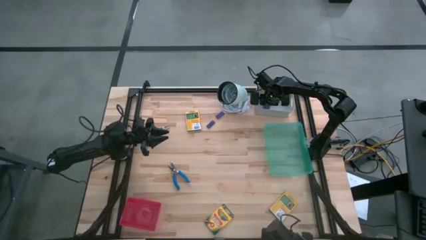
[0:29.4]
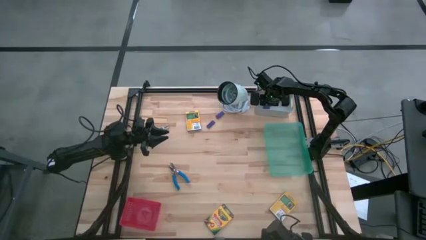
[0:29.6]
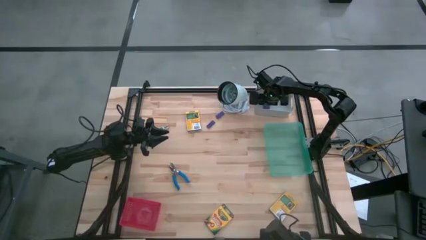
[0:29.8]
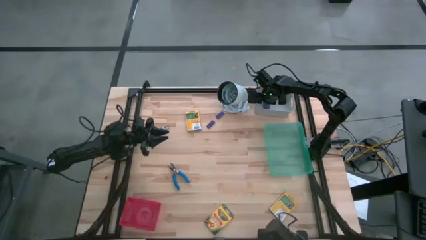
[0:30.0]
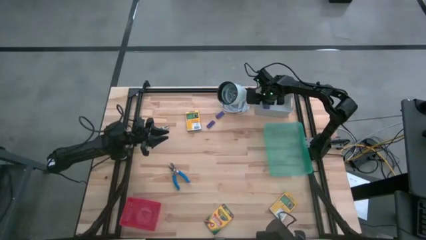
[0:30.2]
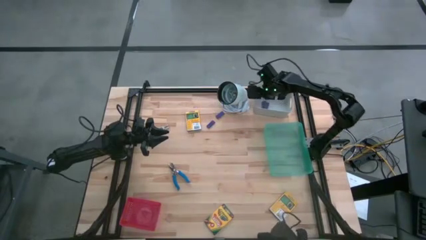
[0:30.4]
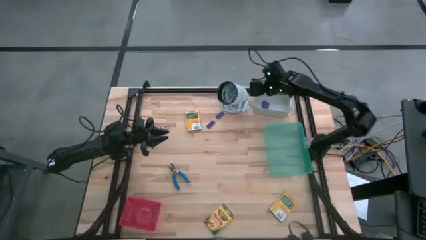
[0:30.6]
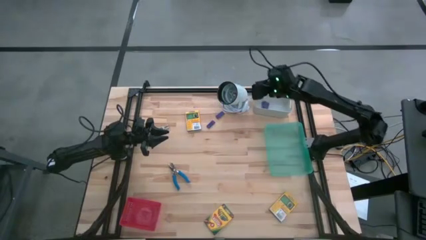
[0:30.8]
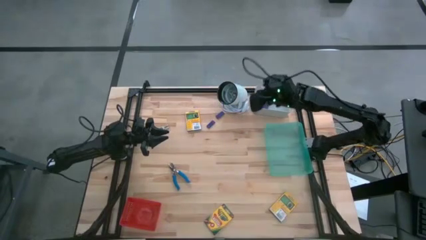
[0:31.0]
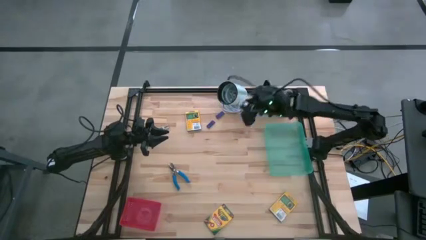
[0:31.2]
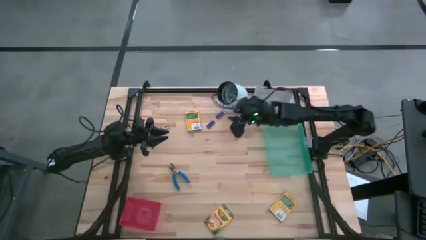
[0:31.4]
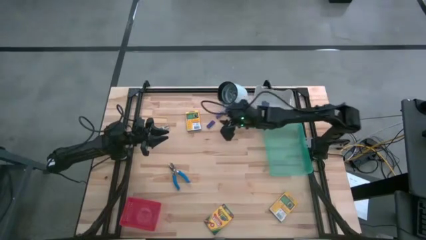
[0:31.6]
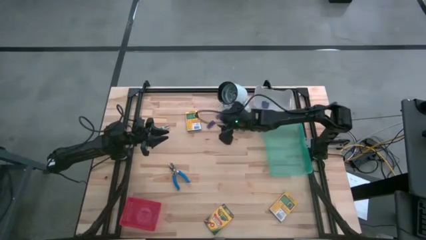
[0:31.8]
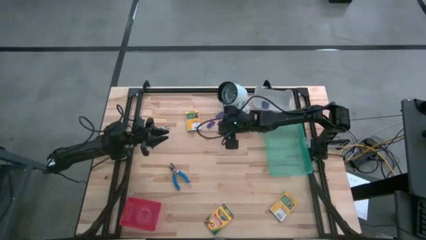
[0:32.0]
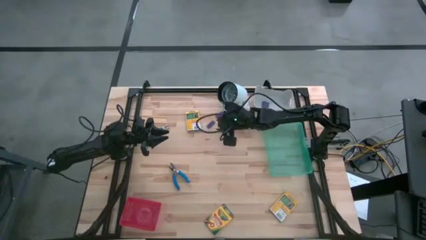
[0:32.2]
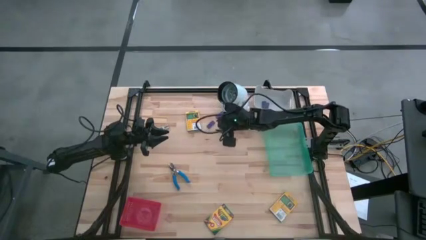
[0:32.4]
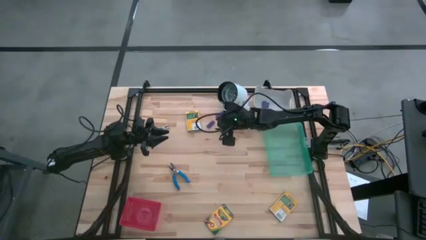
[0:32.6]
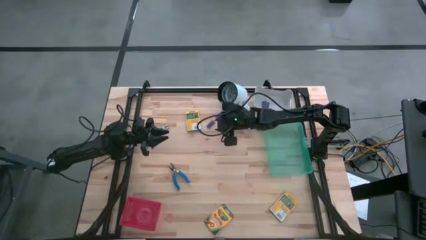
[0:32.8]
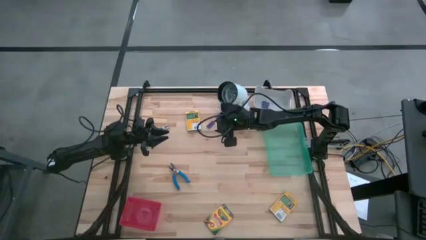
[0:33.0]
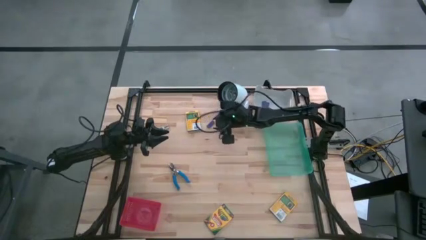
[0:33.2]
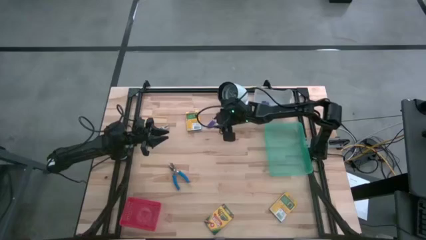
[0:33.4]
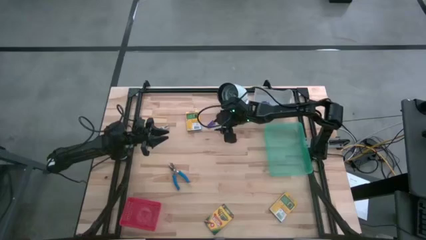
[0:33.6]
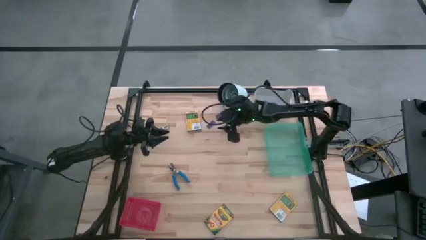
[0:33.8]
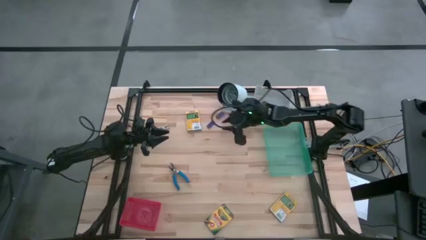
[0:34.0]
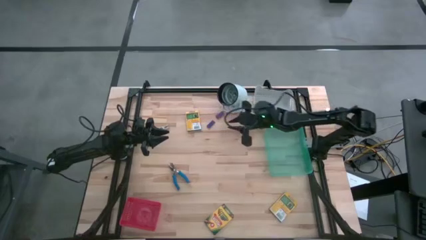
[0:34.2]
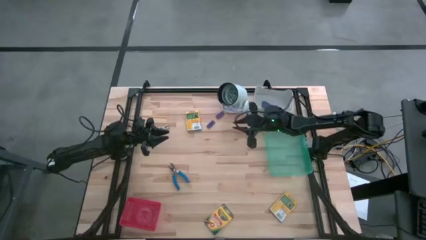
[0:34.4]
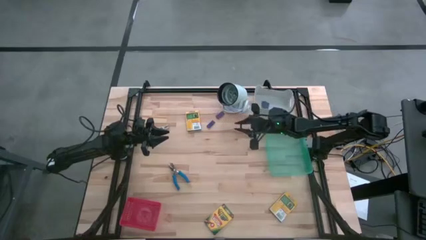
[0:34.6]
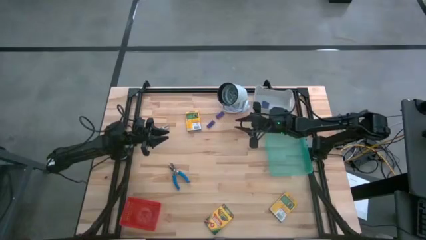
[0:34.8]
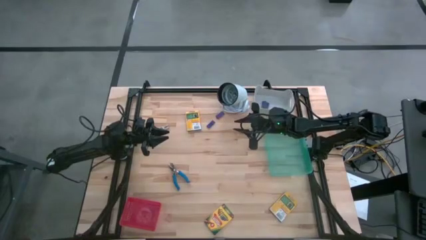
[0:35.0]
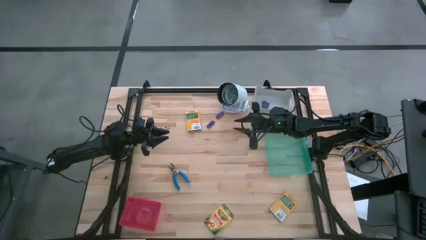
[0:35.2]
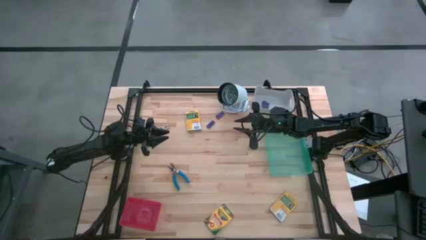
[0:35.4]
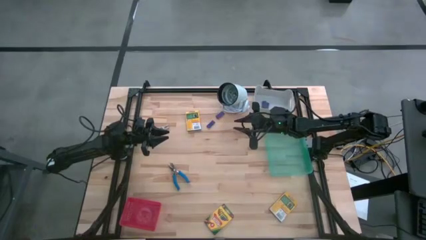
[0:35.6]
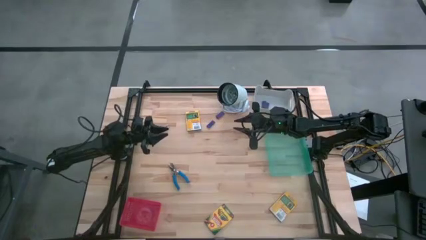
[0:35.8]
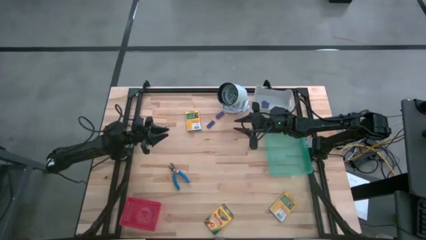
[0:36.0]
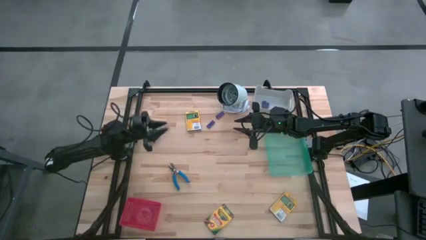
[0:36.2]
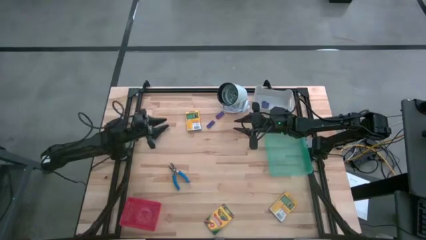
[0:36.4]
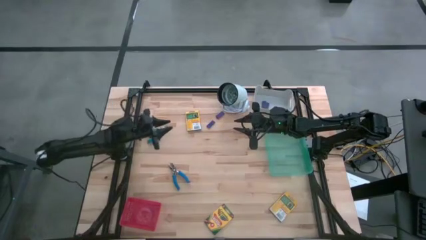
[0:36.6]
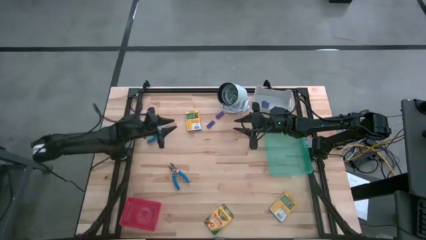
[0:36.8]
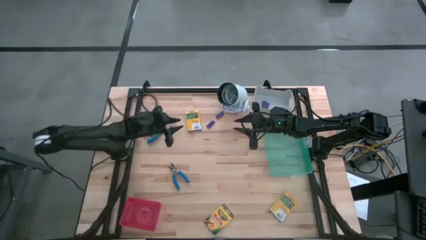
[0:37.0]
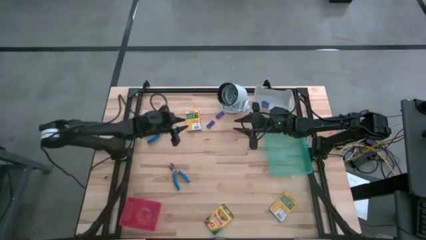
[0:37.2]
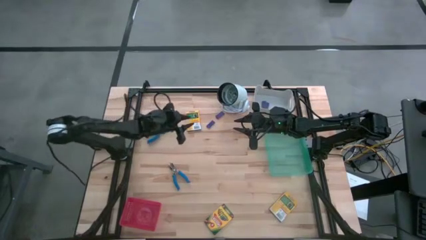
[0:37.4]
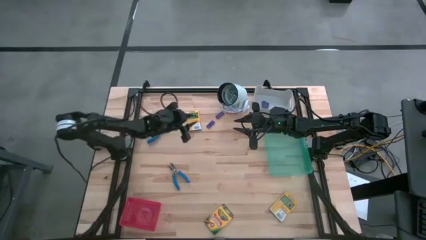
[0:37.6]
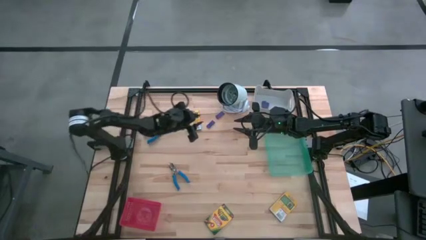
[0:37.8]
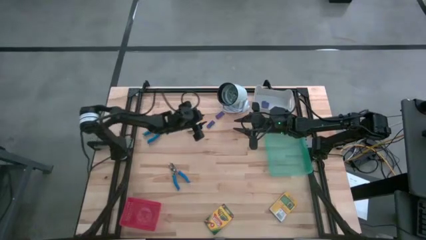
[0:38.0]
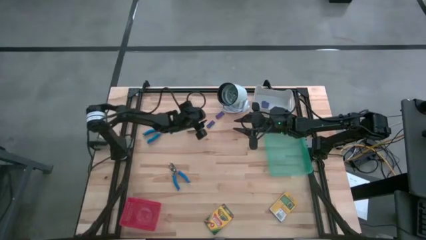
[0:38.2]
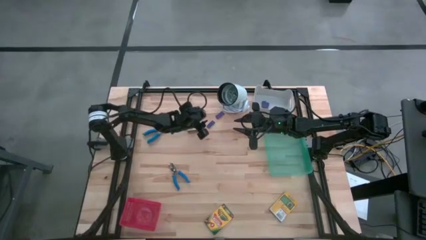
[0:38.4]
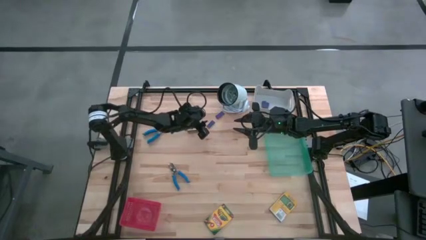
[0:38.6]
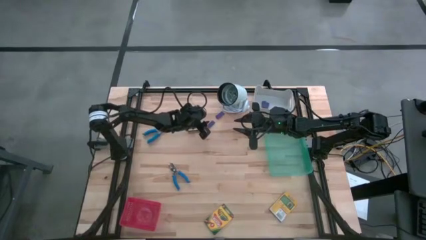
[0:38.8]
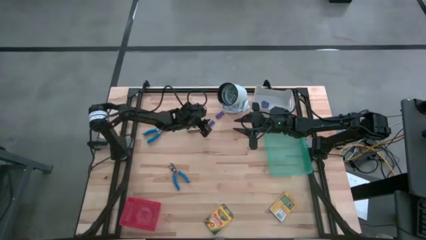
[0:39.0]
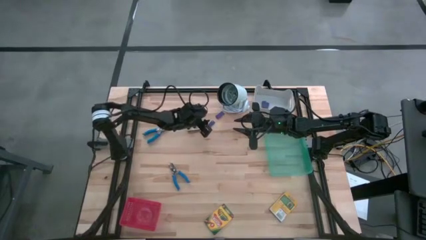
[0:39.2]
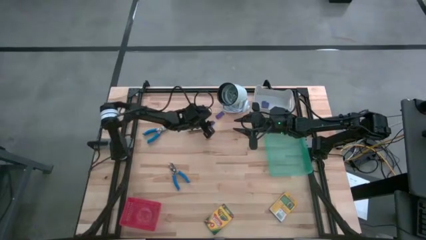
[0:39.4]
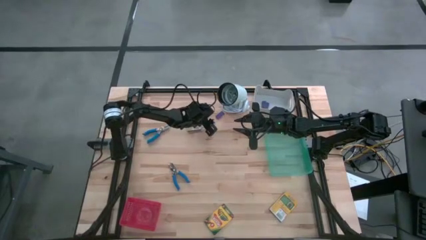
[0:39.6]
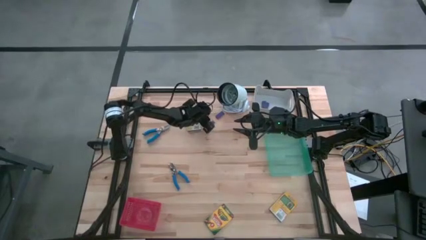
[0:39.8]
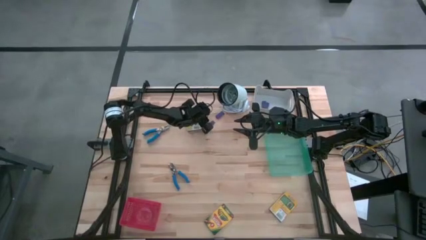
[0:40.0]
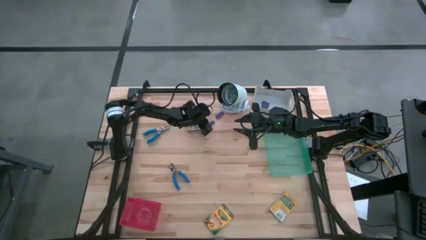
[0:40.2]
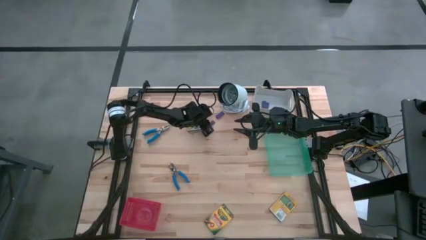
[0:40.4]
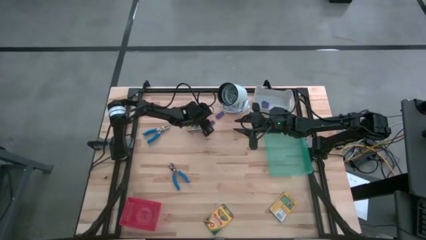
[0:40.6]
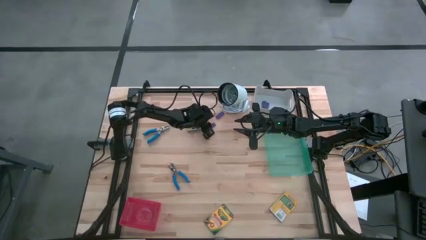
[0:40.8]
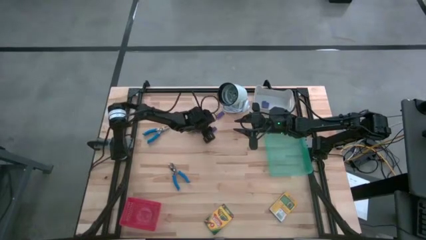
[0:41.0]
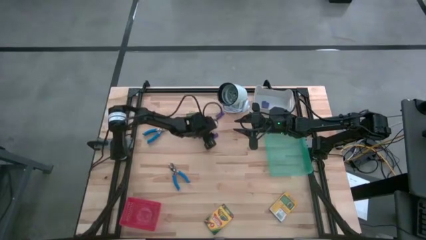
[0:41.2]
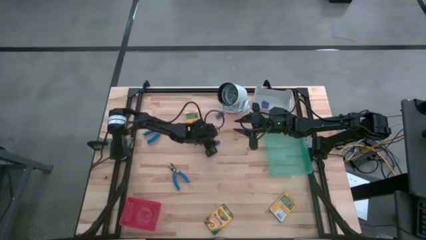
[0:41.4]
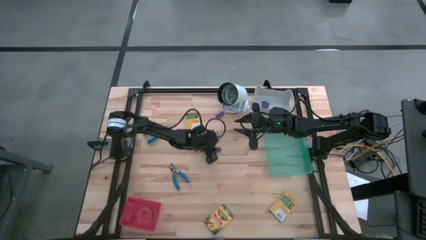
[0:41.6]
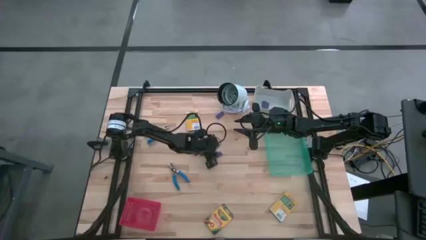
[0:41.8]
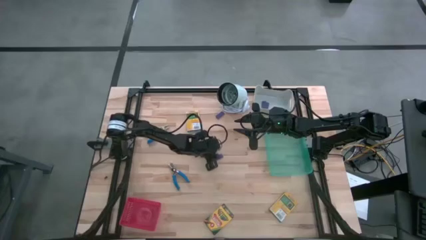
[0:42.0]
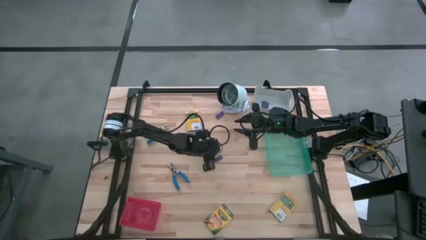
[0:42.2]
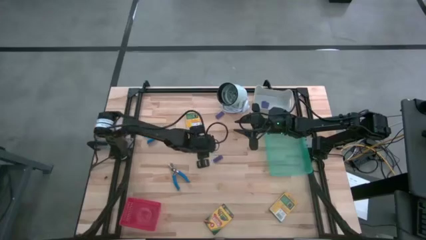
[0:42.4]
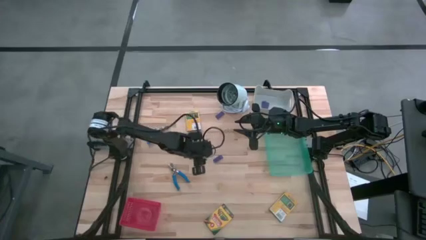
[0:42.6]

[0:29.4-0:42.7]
Task: Pick & Place School Supplies
Put the blue eraser into the gray bin
